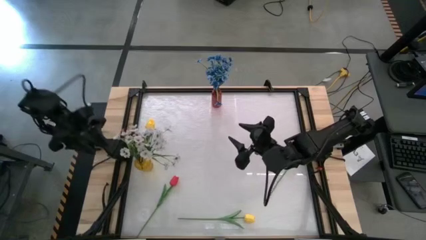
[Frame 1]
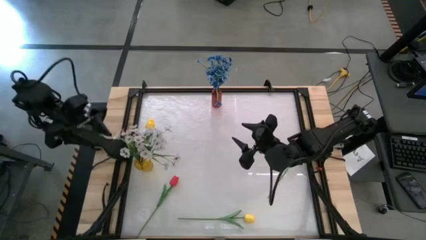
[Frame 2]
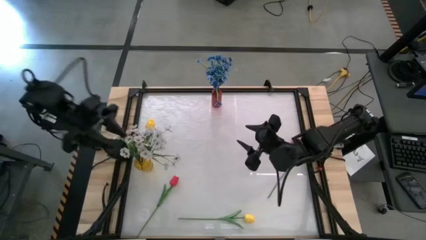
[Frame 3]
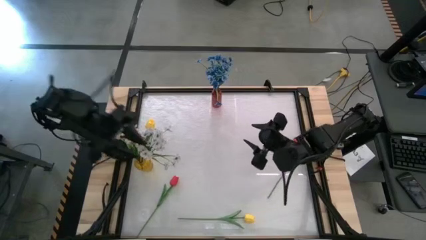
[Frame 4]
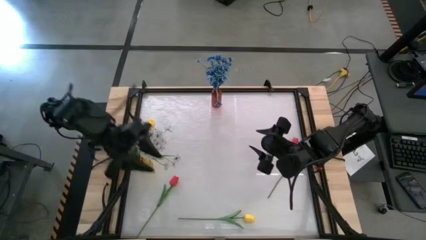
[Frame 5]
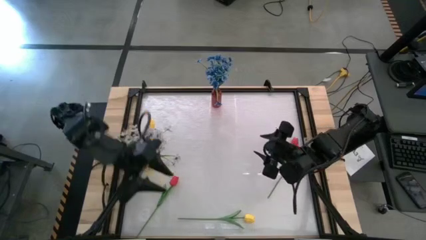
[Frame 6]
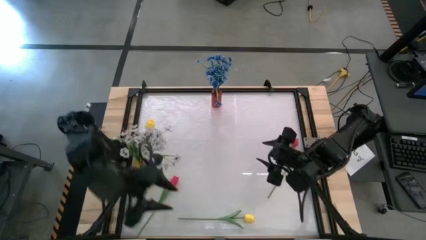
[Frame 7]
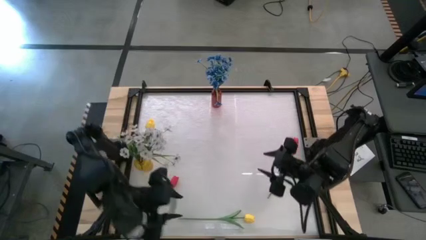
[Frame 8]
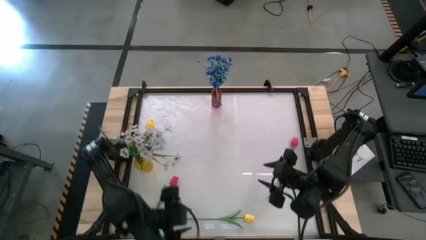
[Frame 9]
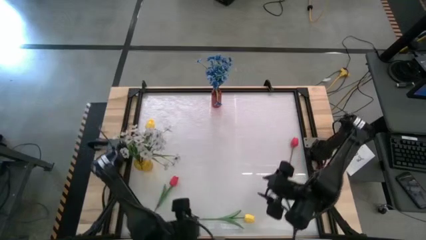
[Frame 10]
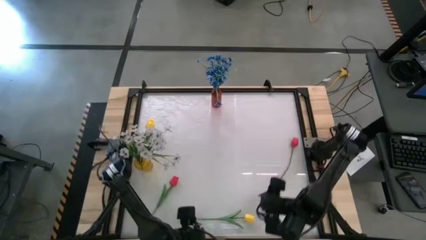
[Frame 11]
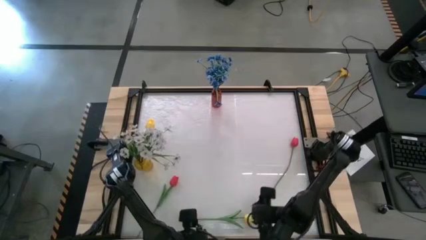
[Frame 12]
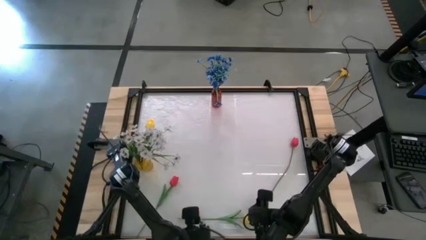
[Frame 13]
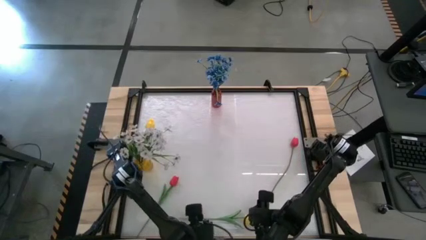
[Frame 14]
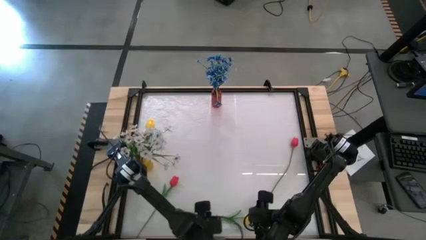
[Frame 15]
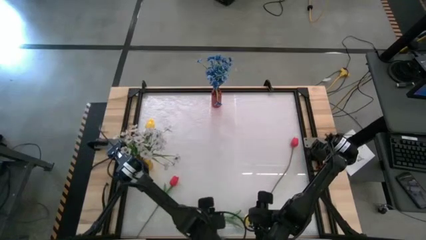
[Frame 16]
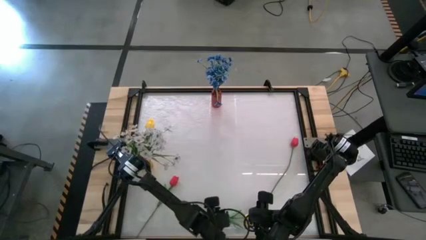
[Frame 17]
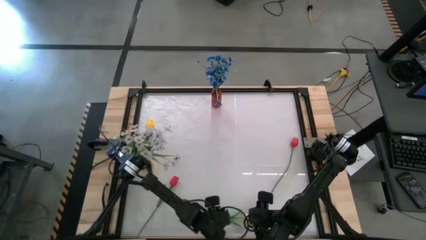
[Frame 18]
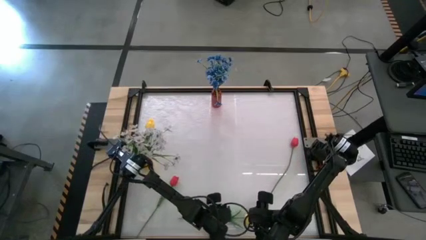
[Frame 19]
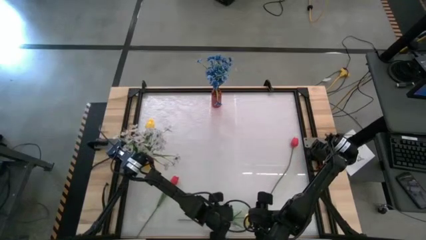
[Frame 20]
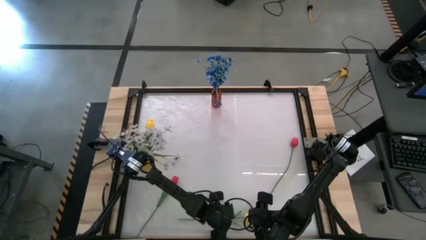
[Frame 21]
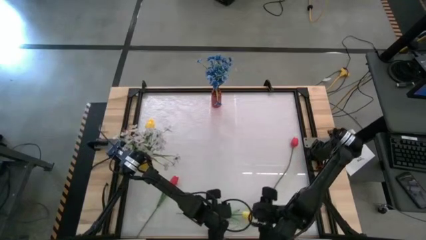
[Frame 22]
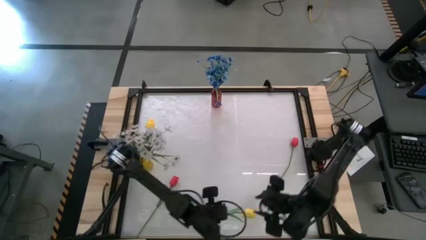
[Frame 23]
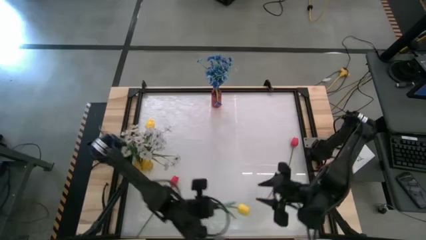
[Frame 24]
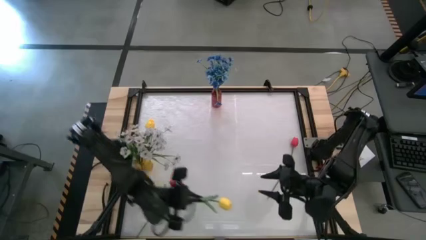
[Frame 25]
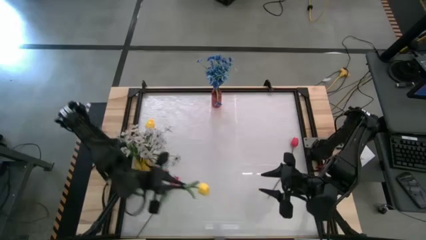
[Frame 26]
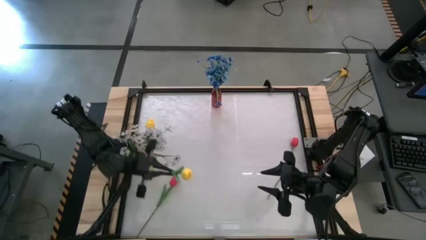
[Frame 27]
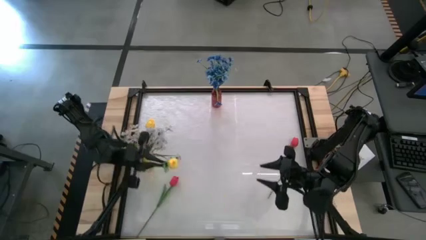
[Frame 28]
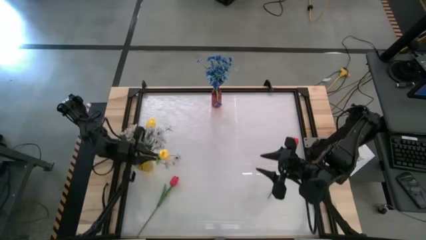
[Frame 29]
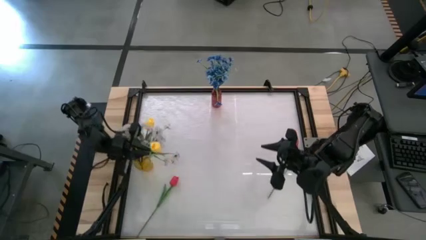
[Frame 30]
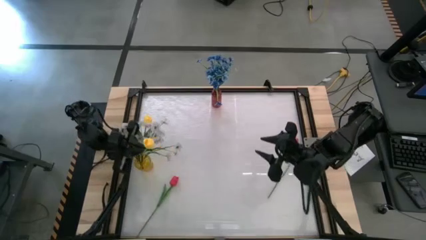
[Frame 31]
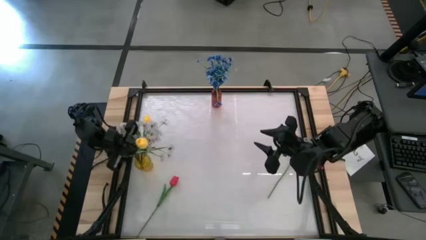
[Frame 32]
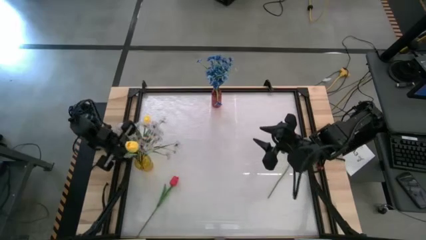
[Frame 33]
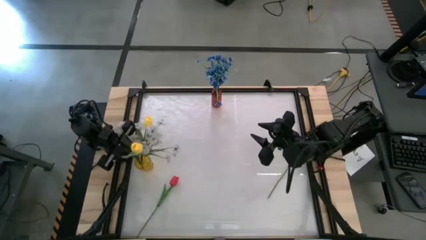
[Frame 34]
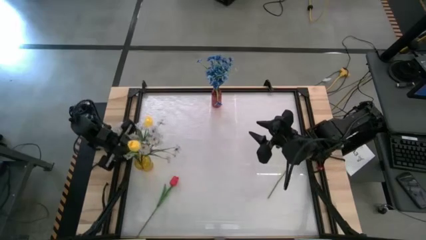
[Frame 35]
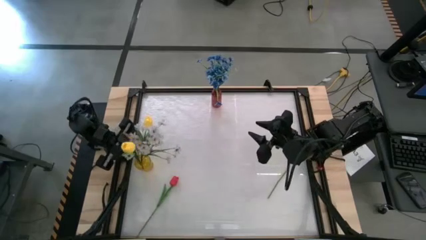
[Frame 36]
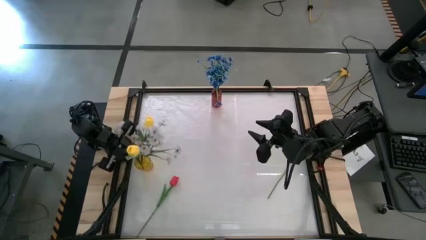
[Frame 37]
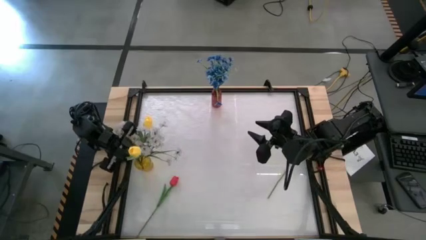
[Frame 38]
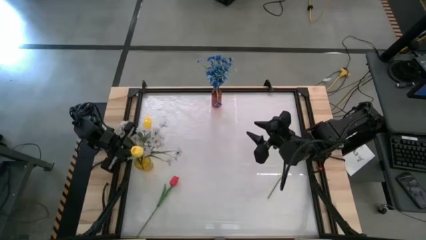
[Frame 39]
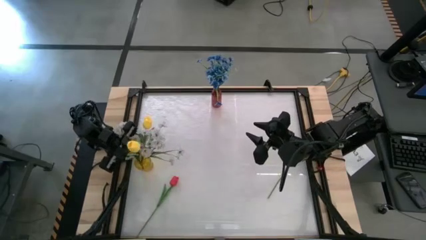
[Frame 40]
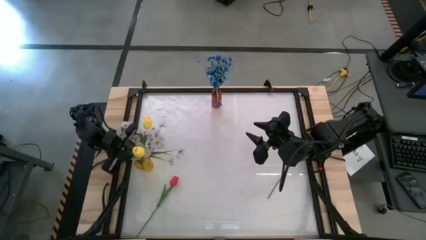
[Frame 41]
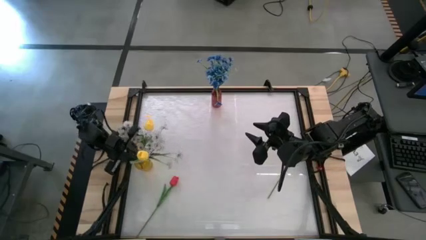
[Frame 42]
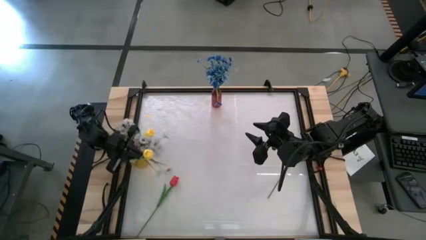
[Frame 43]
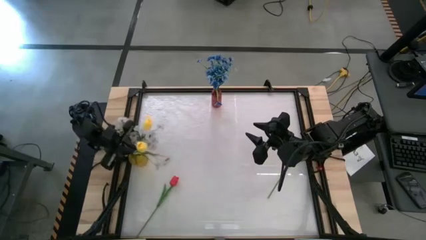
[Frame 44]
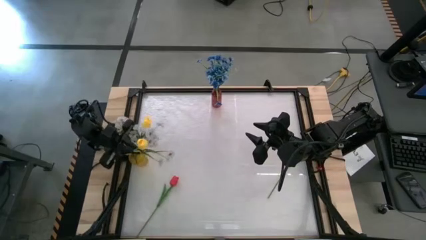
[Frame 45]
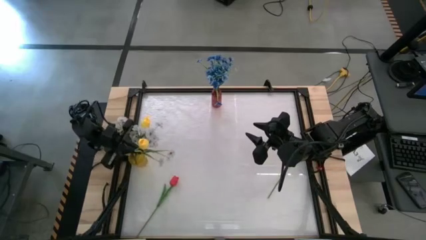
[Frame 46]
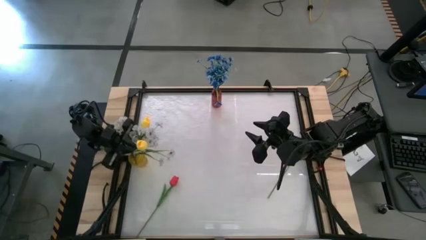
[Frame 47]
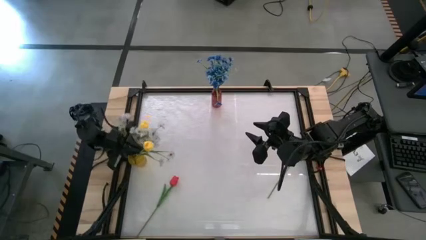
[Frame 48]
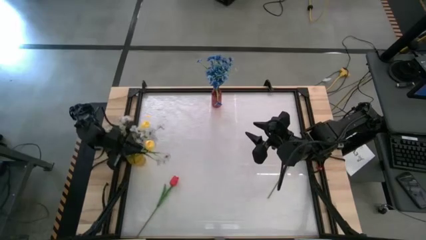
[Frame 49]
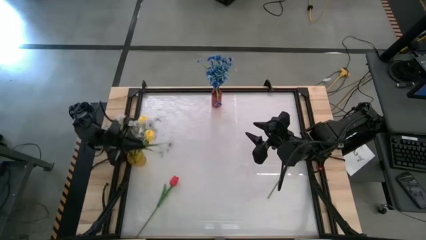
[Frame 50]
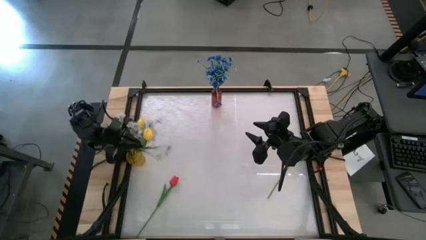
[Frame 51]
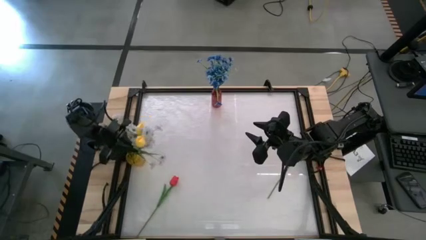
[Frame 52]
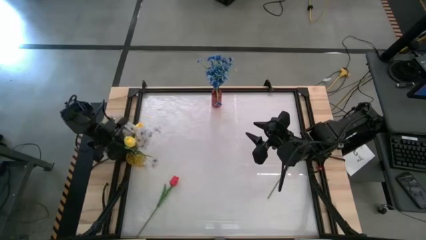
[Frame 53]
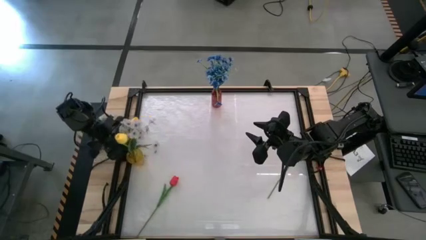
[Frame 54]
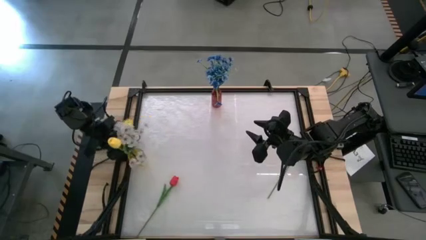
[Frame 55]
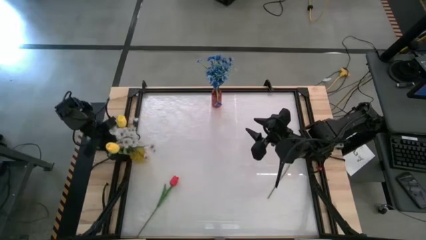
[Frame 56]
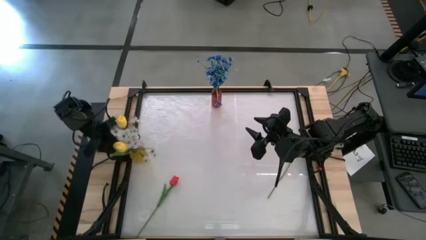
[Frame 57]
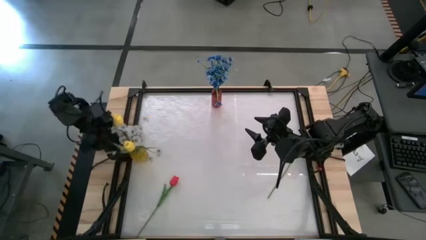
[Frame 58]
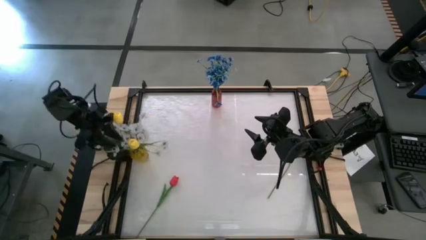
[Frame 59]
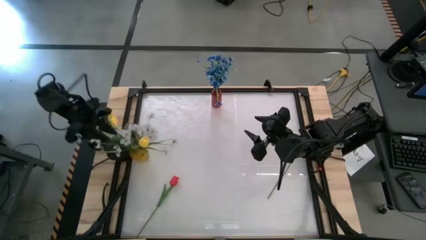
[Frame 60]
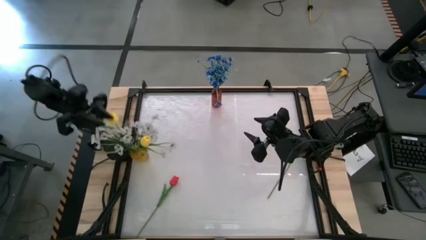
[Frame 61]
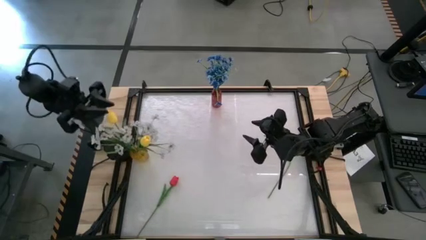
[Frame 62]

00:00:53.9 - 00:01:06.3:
Task: Sort flowers into vase by color
Put the yellow flower into the yellow flower vase

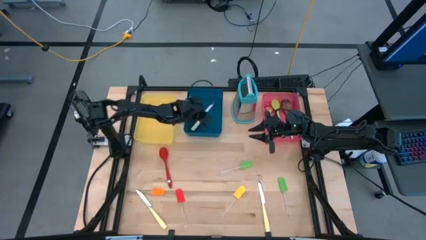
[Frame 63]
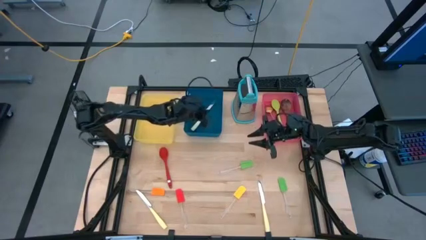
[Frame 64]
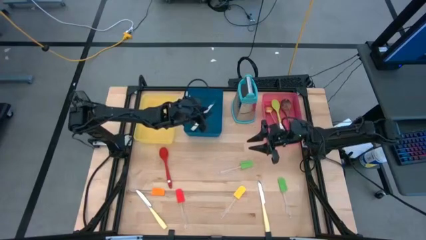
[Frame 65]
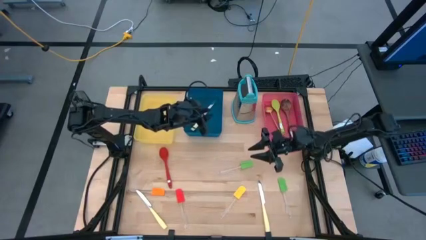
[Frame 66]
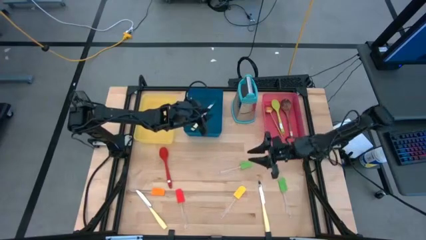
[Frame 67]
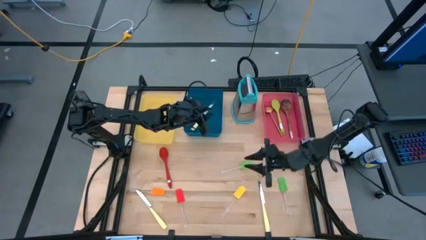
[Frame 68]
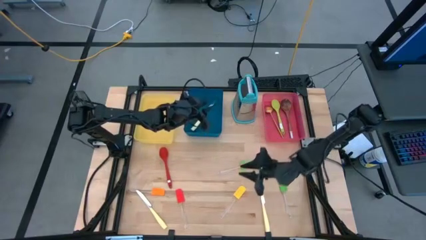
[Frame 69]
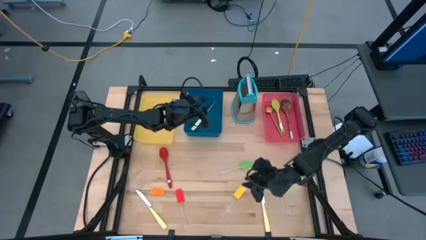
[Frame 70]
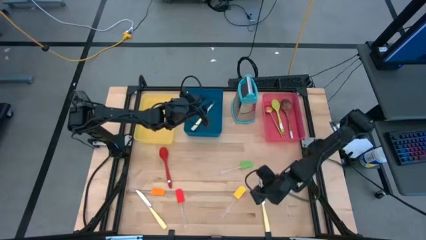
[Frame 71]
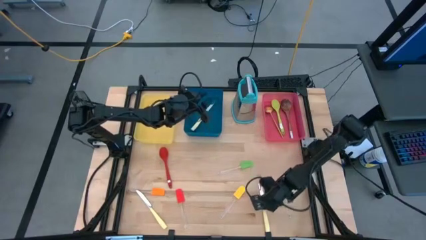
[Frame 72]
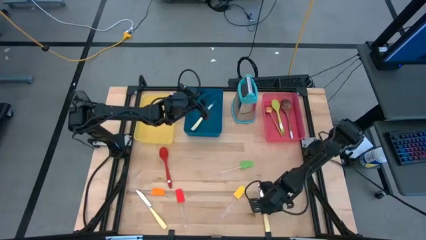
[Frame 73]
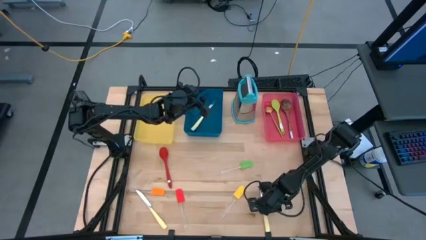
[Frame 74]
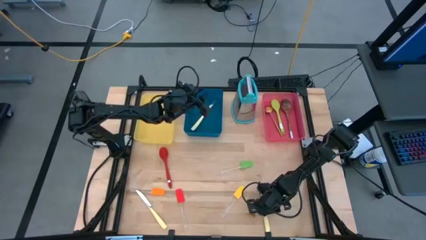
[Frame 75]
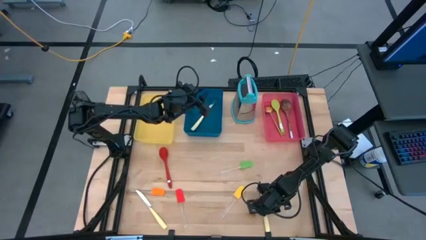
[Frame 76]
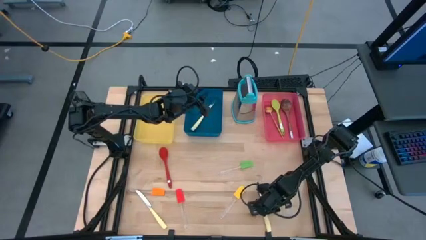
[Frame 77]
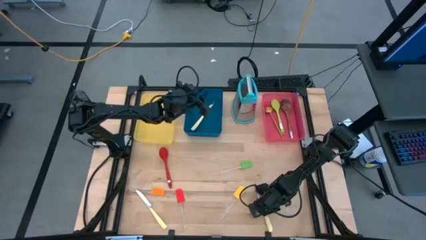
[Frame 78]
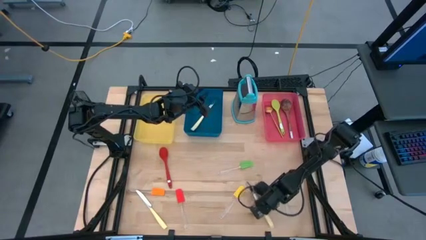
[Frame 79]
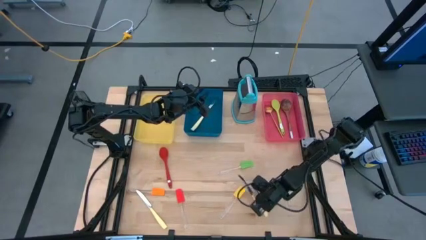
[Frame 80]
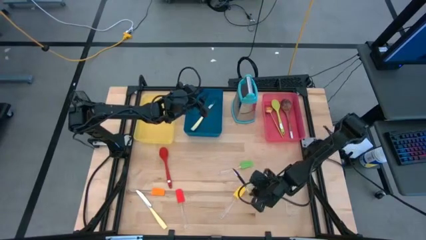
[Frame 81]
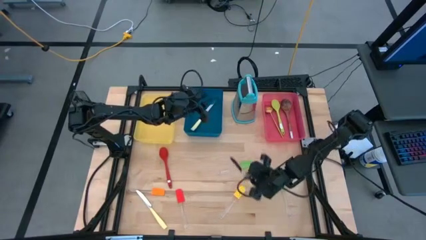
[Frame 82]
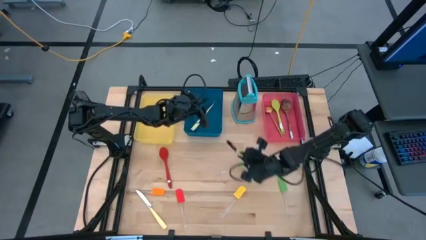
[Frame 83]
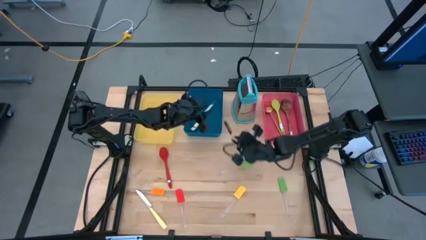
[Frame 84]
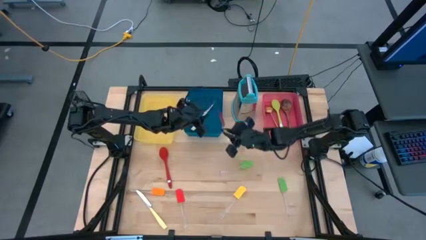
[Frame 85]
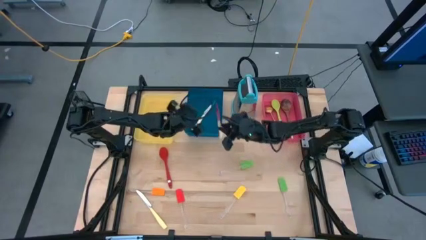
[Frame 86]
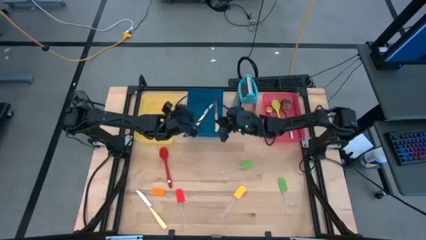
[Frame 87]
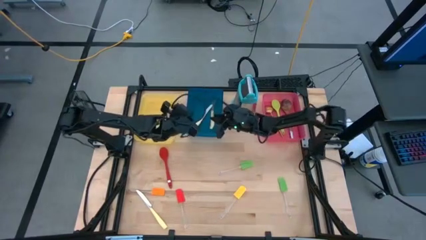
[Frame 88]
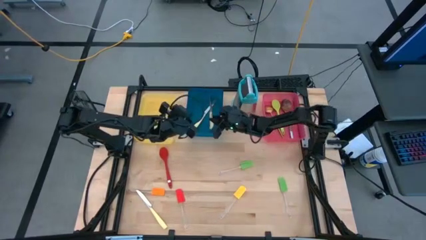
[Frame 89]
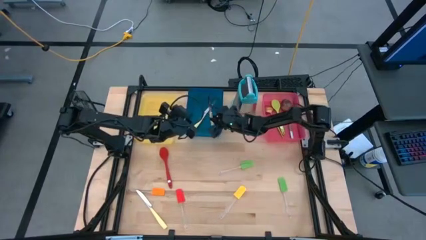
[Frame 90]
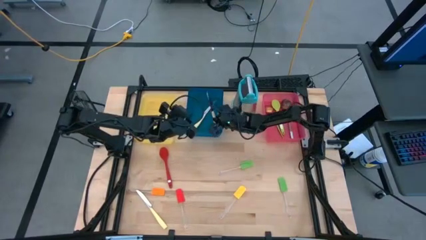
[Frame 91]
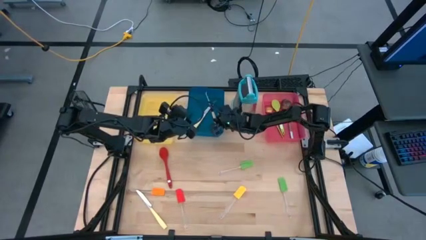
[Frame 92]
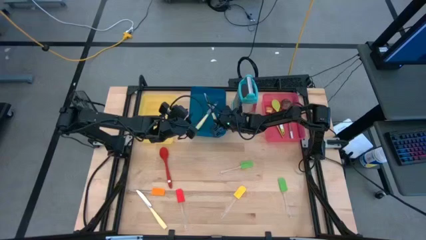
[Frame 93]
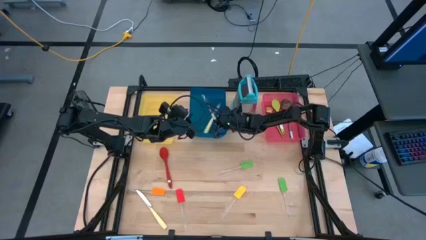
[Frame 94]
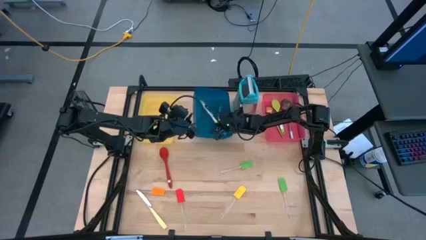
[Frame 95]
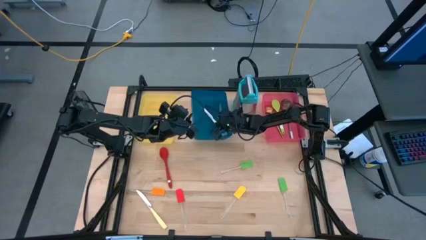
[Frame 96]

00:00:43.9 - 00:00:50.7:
Task: Pick & Place Kitchen Items
Put the right yellow knife into the blue bin
